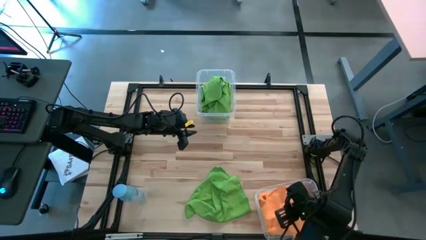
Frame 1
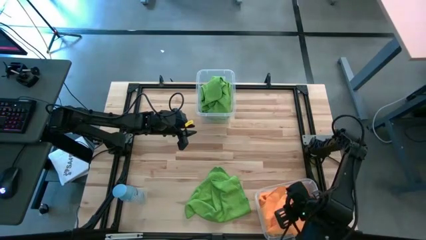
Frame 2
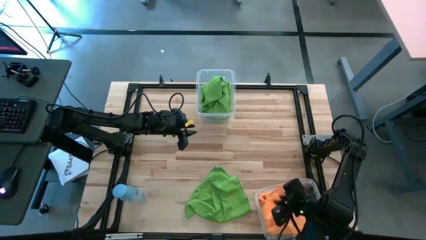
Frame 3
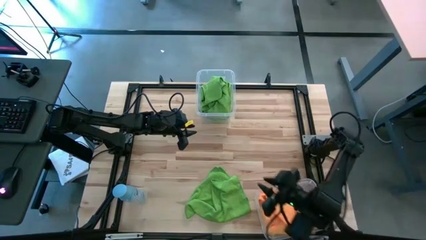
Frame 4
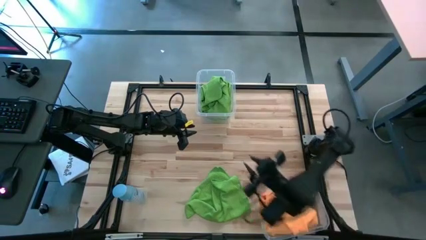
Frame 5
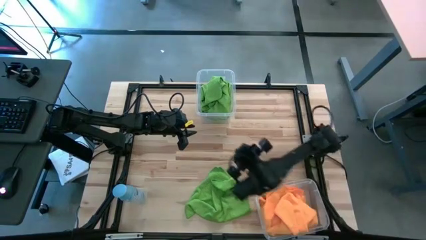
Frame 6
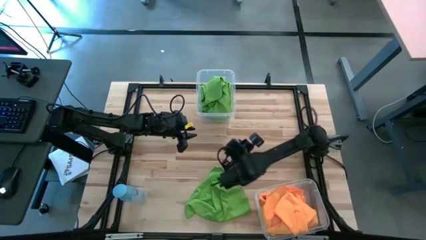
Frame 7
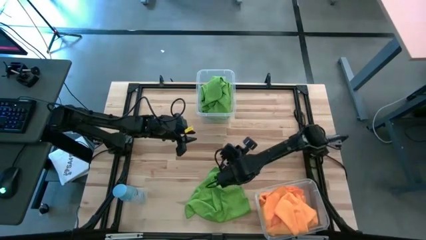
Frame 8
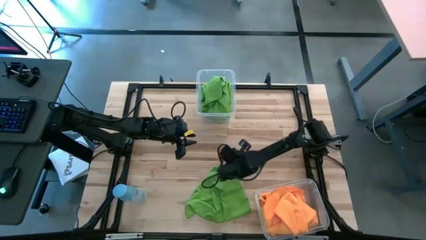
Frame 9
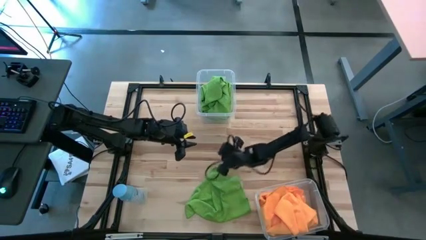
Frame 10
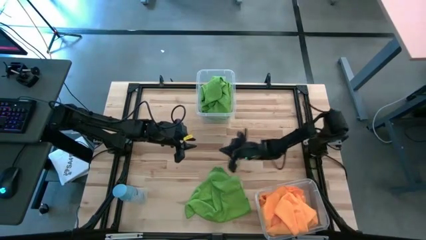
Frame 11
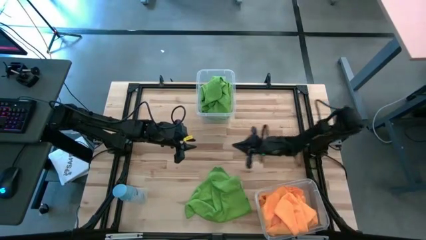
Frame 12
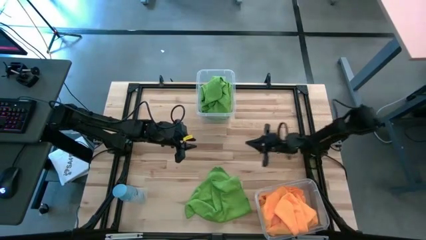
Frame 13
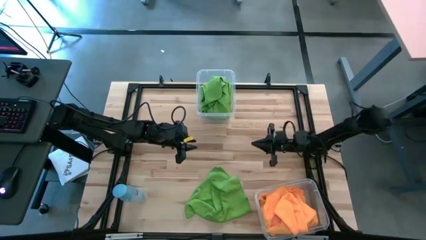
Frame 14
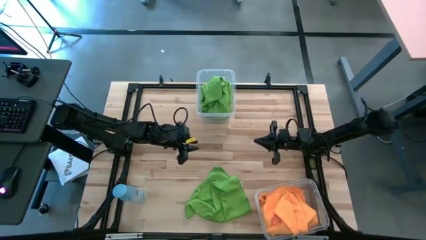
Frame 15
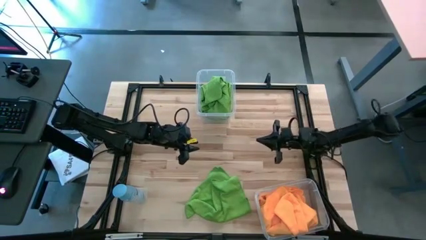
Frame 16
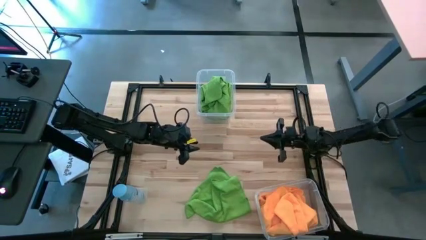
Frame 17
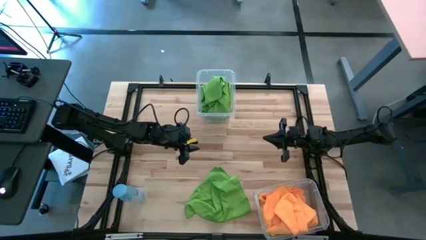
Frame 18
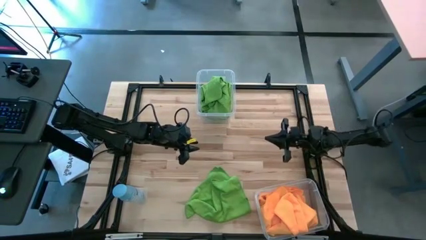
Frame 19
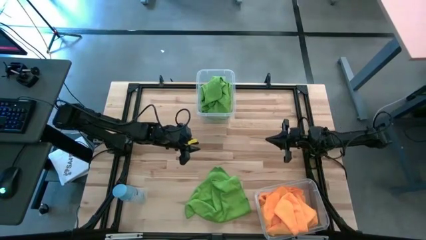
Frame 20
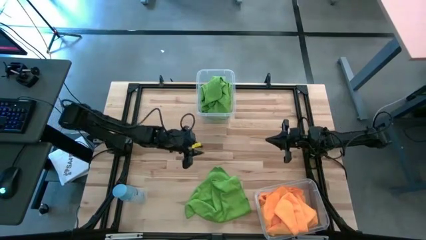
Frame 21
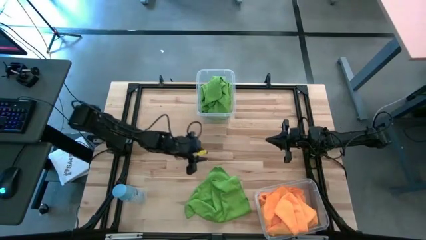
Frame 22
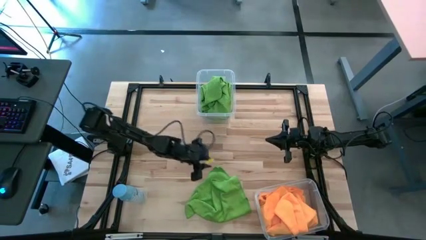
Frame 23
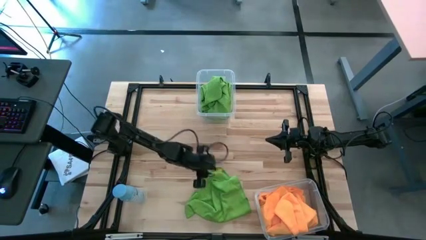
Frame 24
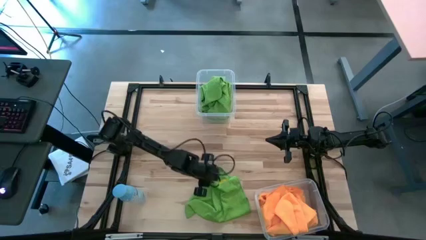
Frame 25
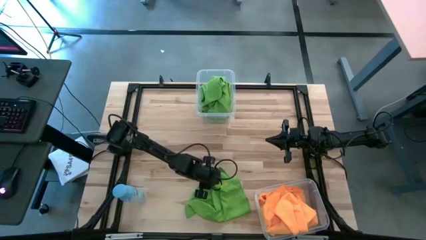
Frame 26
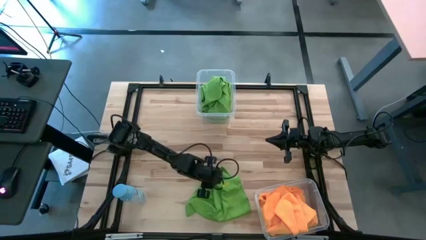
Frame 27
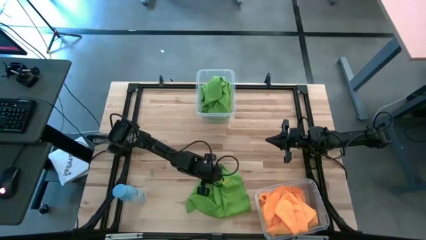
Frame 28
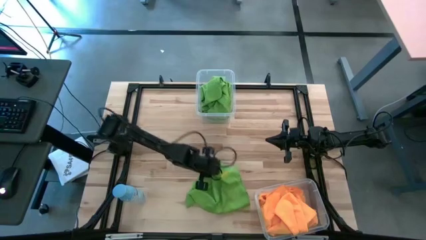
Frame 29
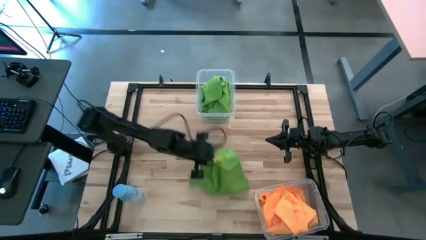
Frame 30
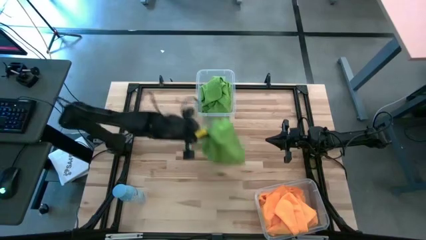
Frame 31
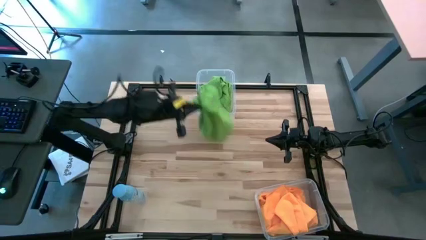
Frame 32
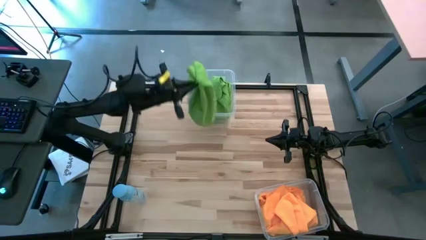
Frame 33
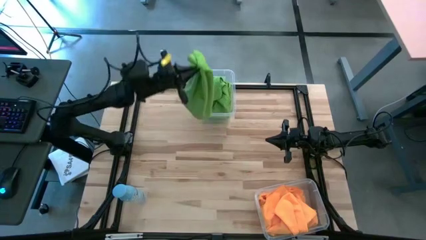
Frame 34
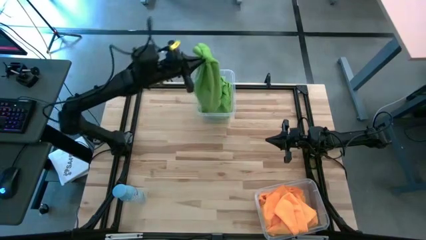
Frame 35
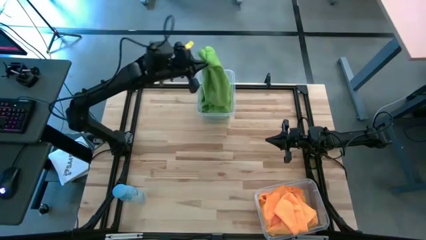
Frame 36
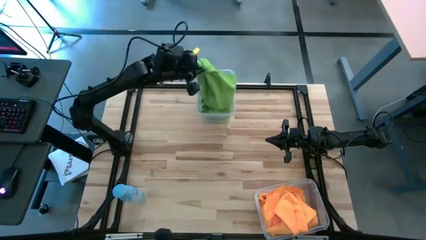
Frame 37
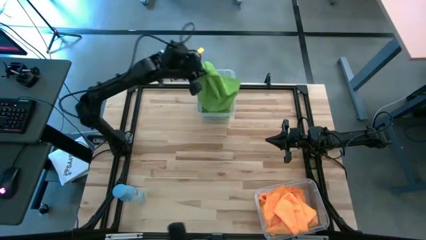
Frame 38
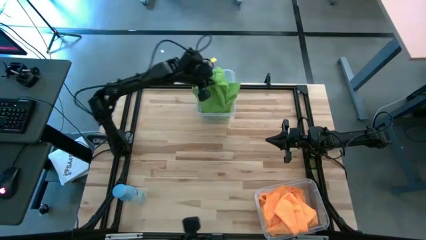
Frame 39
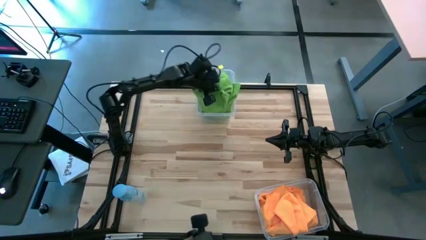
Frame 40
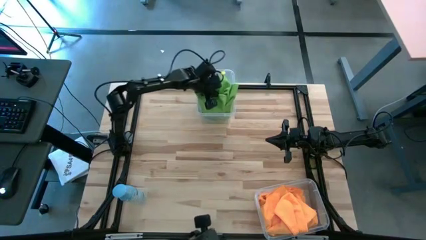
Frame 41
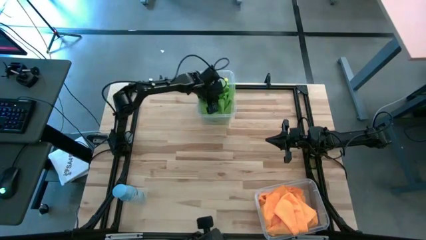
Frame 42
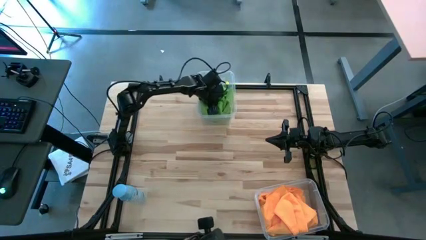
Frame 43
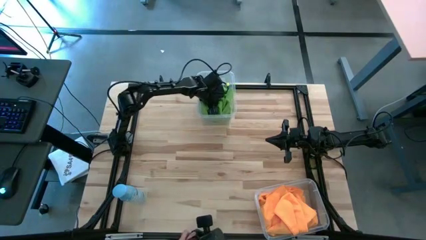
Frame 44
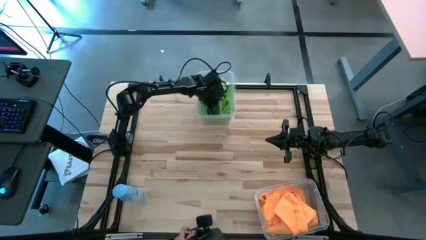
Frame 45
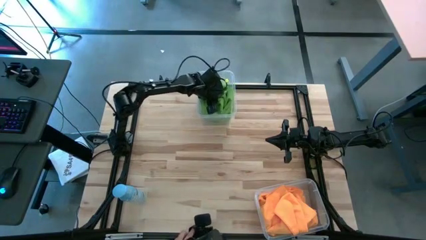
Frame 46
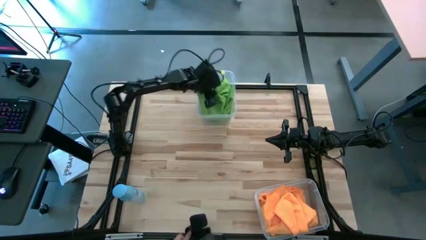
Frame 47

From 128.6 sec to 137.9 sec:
Task: Sort microfiber towel by color & place in baskets
Put the green microfiber towel into the top transparent bin

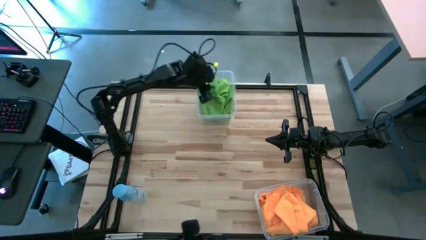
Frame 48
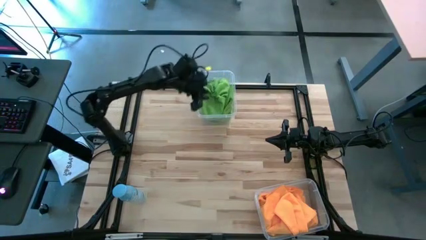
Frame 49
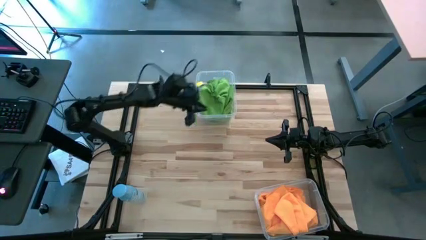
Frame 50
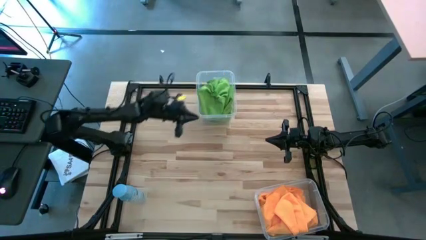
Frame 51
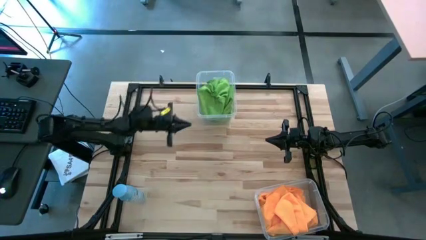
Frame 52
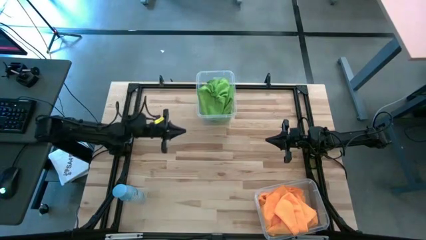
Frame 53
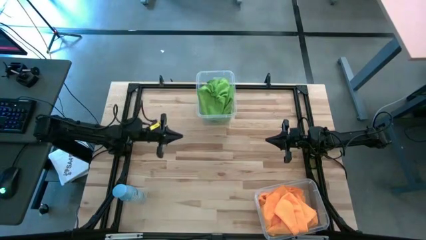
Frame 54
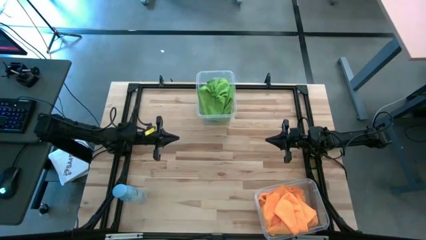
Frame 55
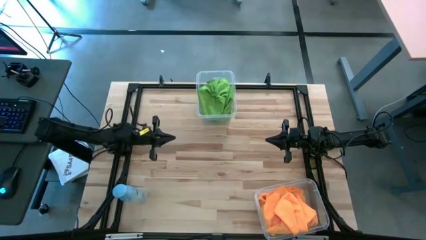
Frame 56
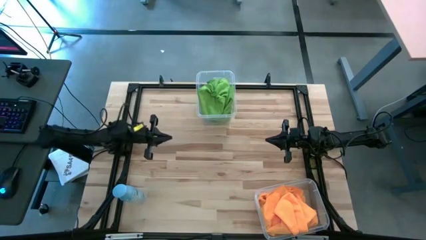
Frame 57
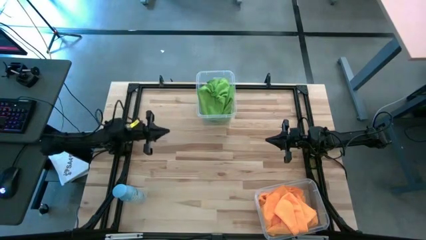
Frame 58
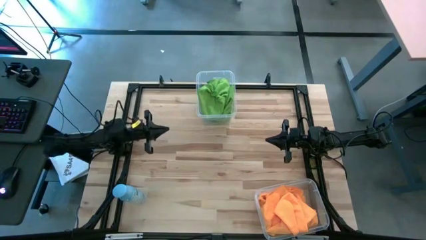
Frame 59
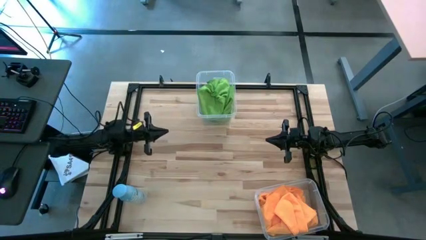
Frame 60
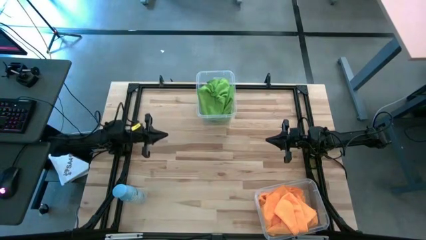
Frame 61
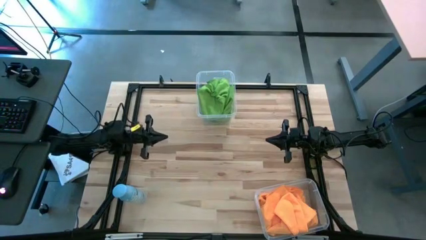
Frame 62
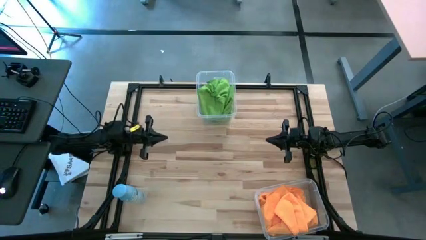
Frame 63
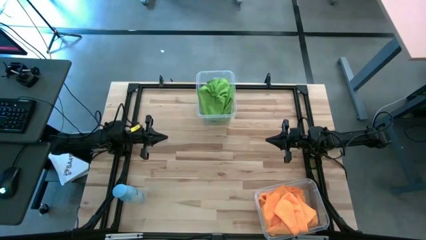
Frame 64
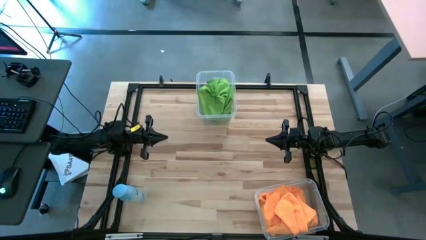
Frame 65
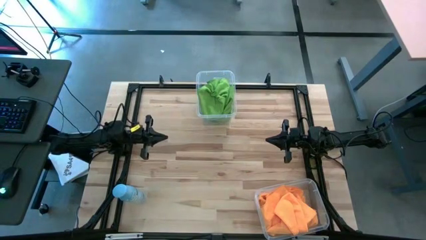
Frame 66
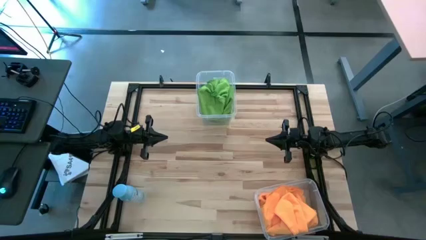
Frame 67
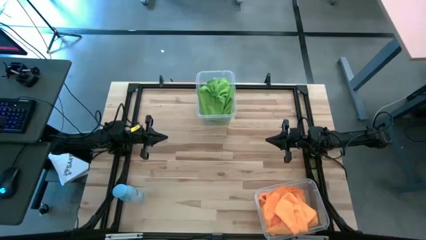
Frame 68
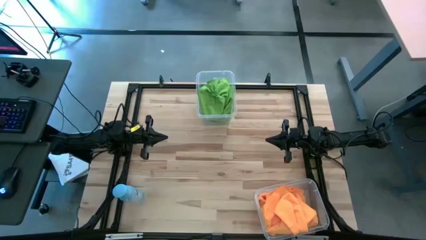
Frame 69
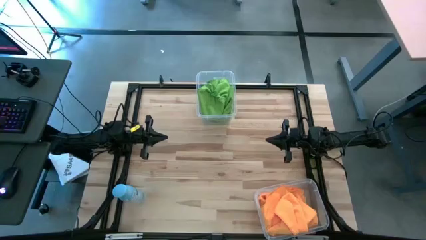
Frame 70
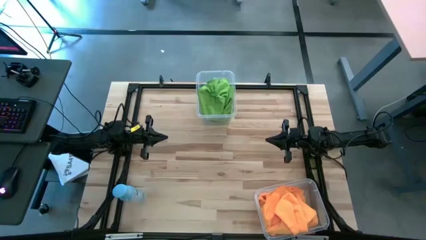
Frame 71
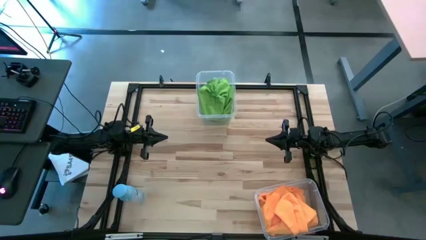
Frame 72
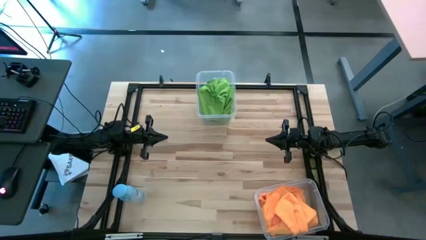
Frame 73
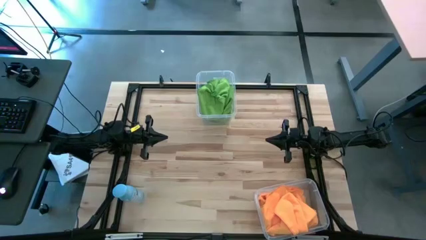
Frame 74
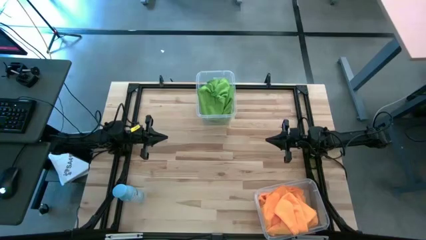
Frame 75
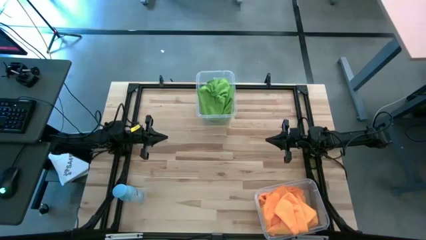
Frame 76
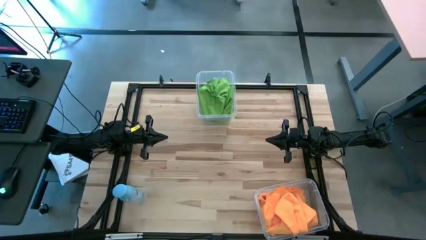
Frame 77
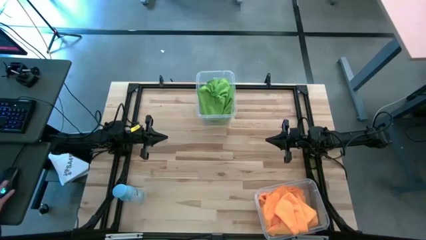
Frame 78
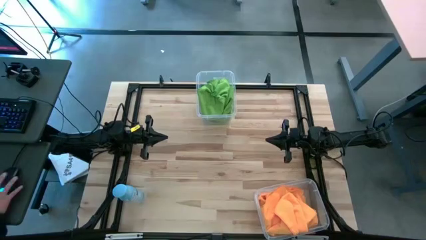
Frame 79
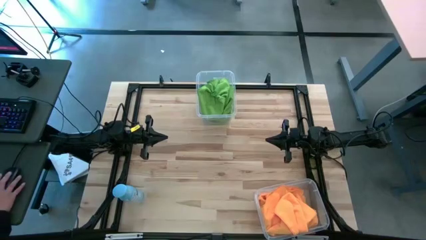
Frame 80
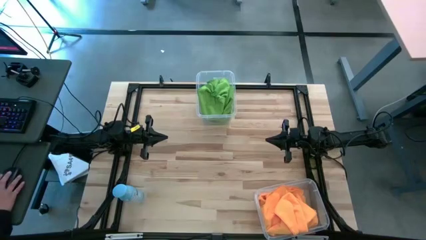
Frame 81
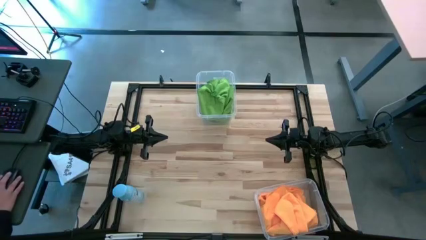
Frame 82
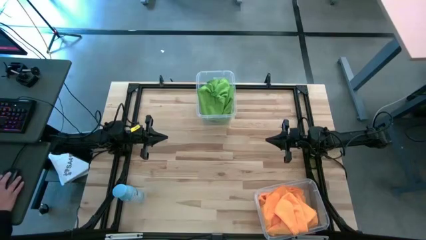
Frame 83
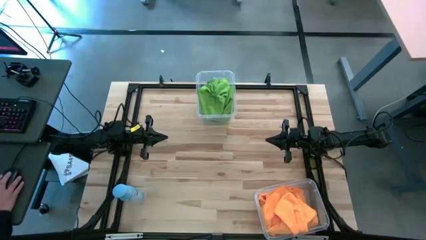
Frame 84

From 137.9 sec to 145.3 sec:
Return to Home Position
